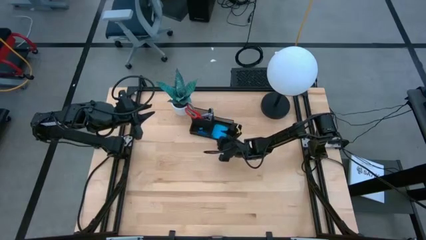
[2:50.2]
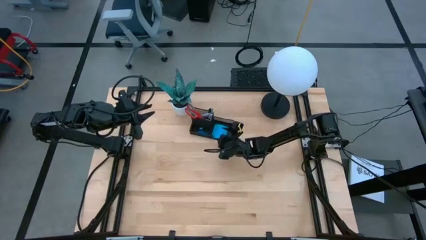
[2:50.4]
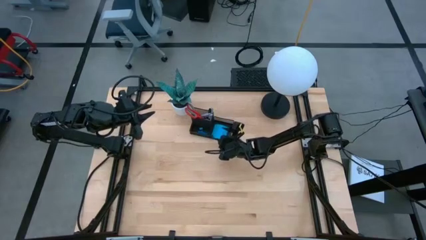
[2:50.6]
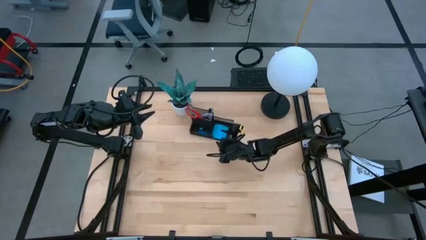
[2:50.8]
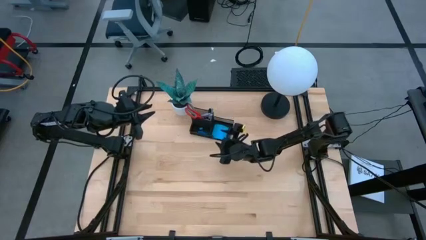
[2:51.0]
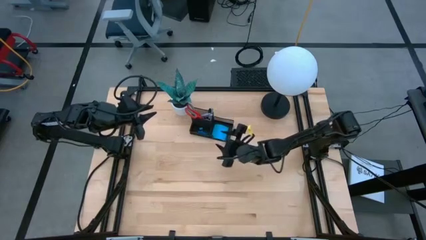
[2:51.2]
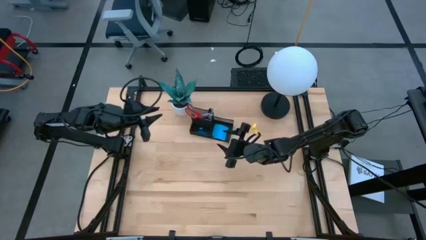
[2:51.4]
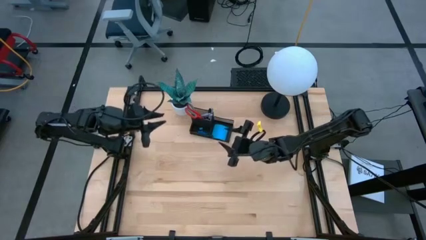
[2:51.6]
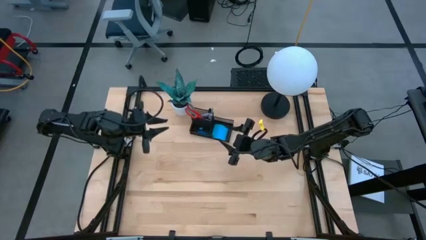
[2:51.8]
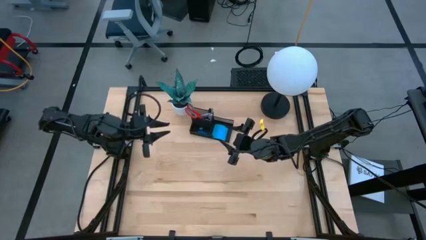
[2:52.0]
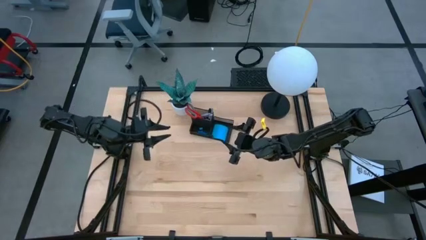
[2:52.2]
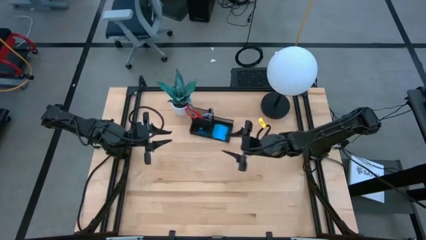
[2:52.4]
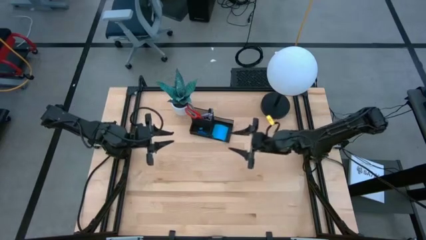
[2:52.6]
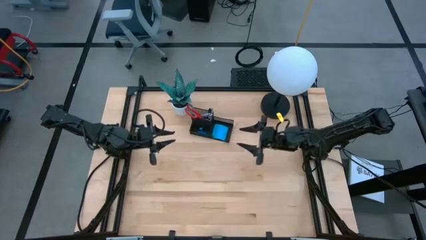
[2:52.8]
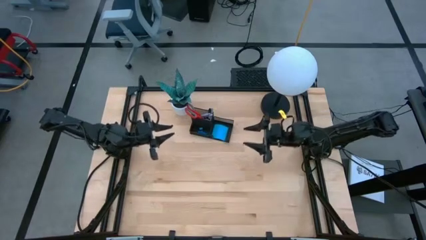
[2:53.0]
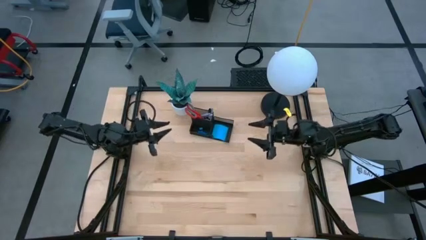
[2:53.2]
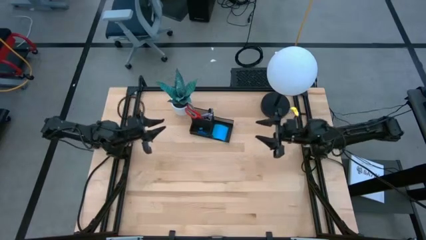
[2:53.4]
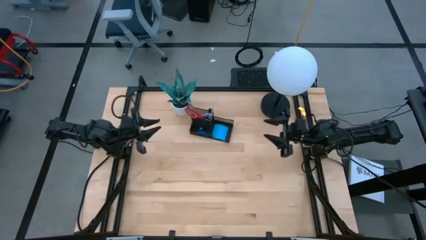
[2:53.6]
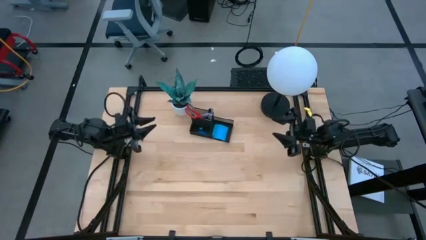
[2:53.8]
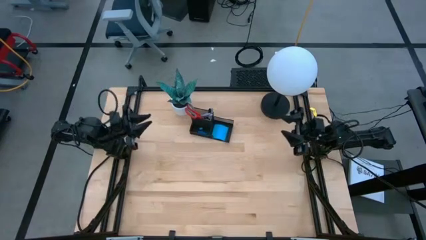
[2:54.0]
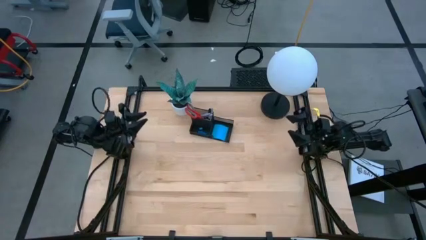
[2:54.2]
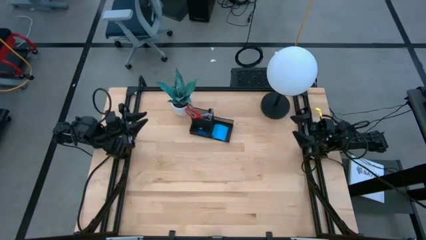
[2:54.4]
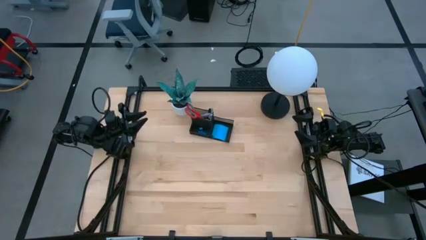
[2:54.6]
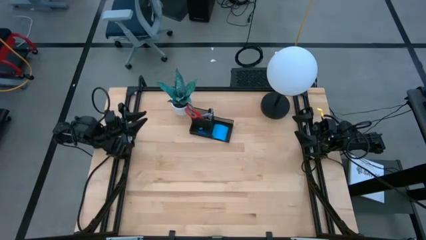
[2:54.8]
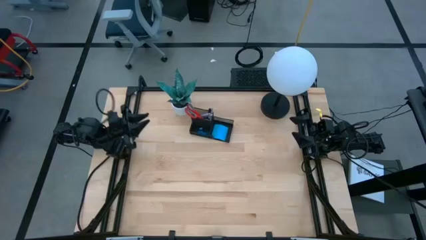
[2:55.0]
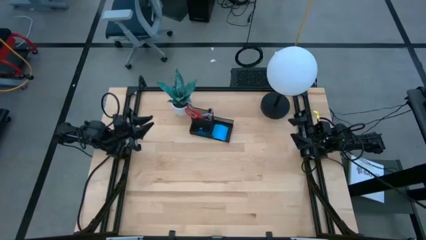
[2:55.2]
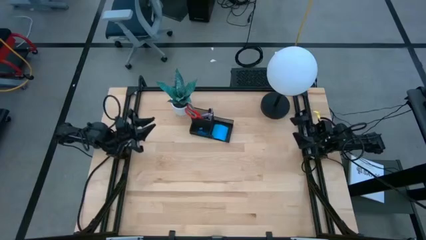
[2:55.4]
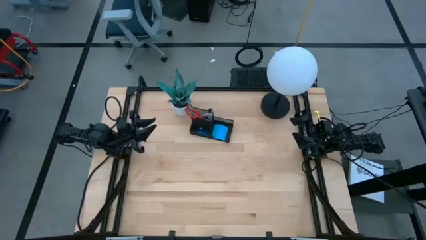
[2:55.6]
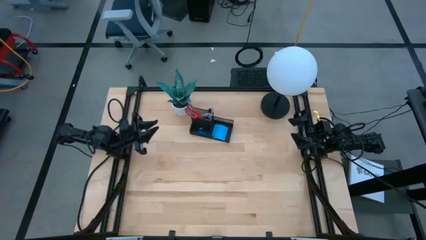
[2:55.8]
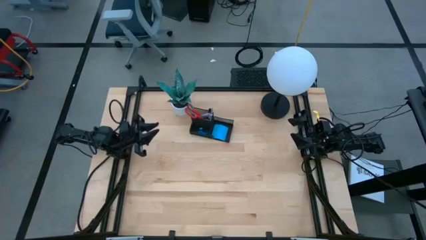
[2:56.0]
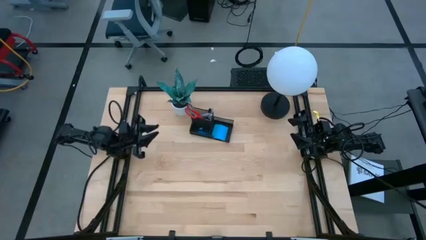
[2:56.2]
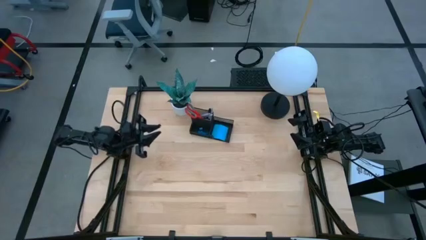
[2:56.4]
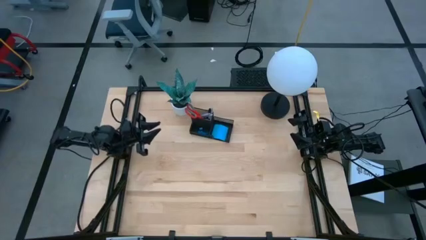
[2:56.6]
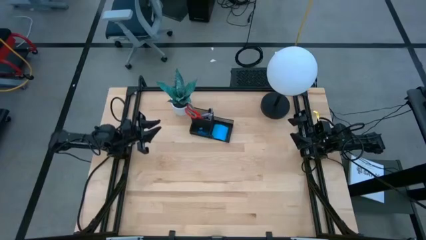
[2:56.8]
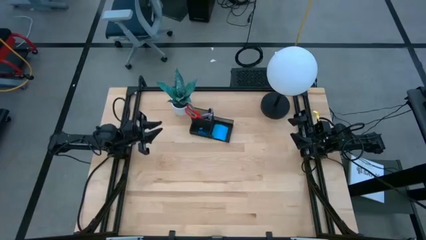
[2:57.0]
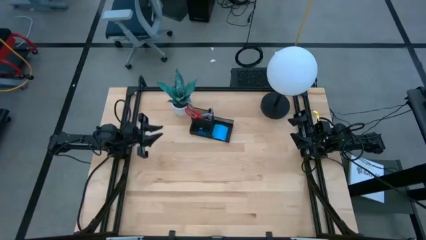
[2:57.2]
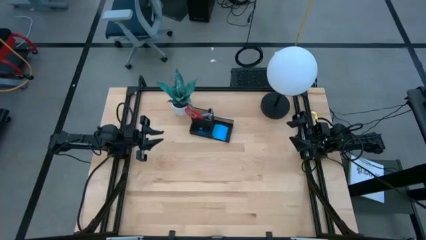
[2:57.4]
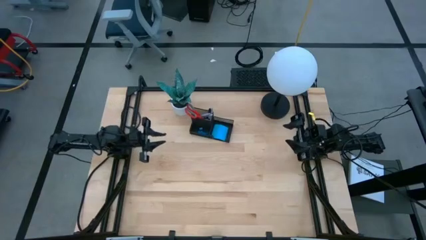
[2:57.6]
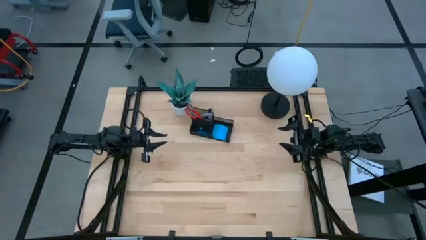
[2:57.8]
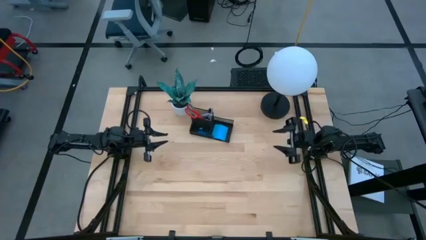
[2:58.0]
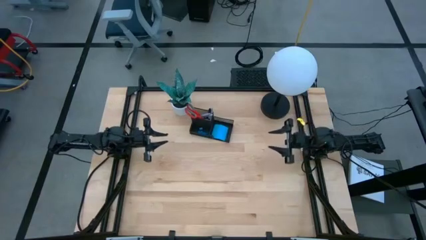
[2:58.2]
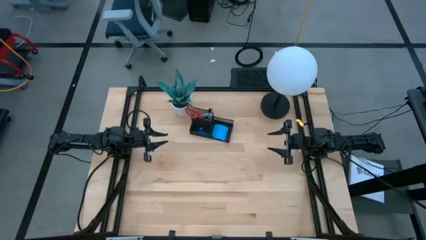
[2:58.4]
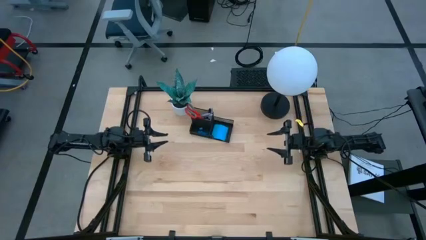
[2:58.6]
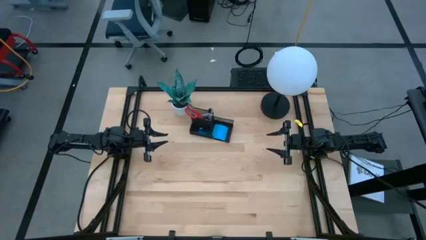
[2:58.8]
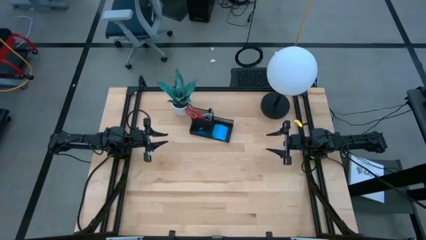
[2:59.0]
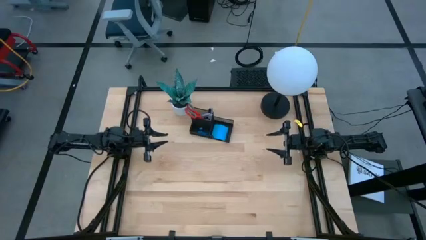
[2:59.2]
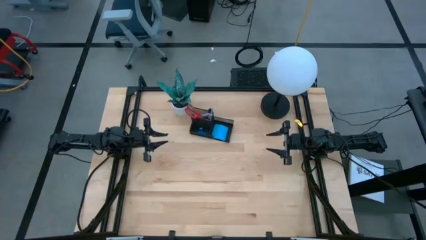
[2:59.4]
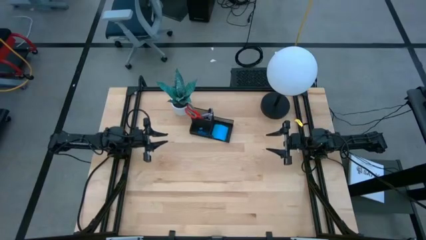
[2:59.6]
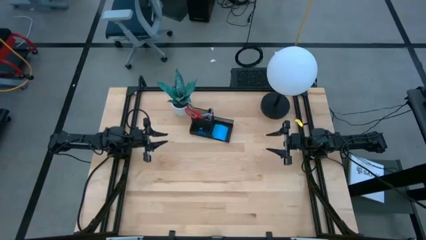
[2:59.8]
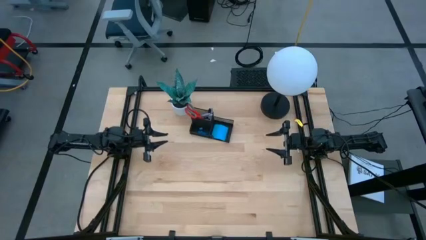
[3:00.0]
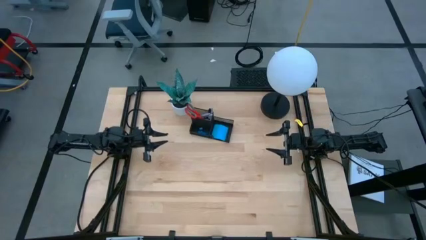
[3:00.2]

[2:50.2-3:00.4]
Task: Pick and place office supplies into organizer
Return to Home Position

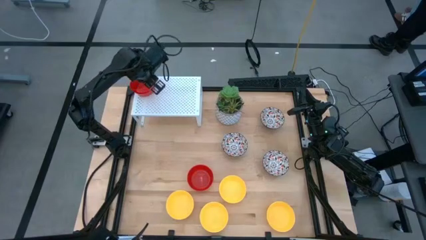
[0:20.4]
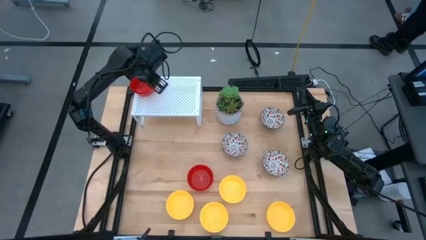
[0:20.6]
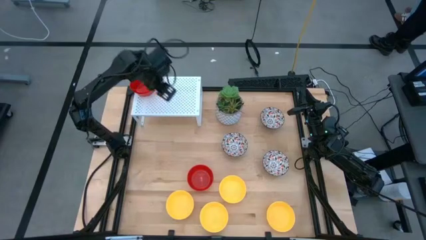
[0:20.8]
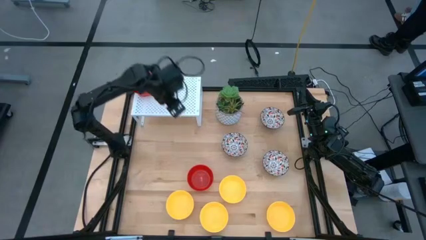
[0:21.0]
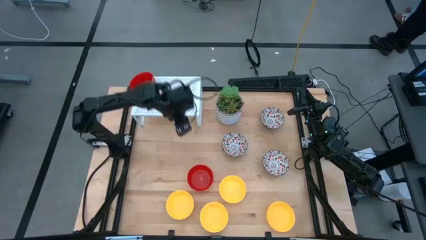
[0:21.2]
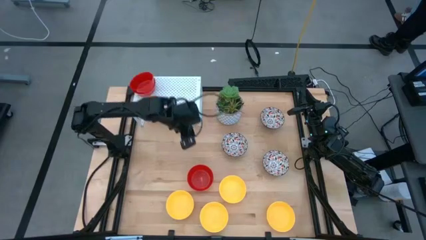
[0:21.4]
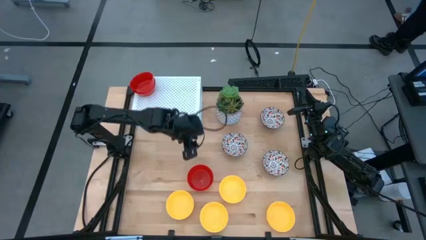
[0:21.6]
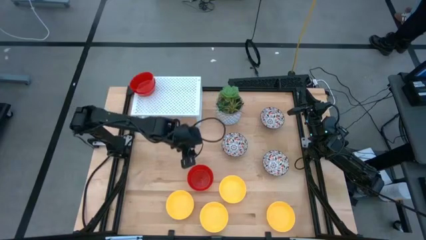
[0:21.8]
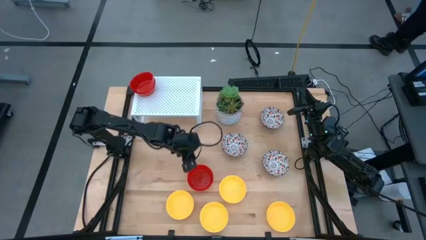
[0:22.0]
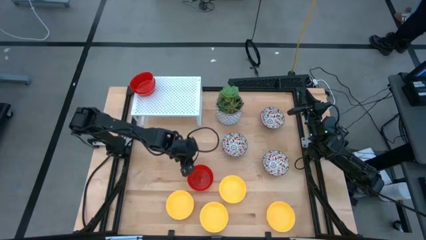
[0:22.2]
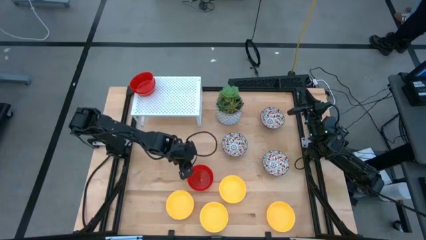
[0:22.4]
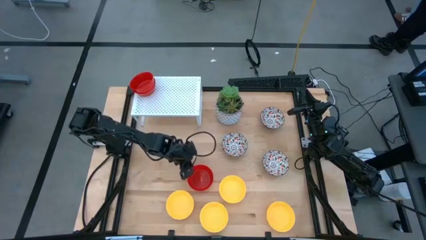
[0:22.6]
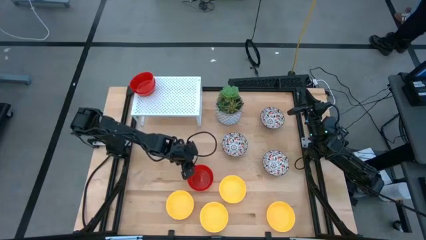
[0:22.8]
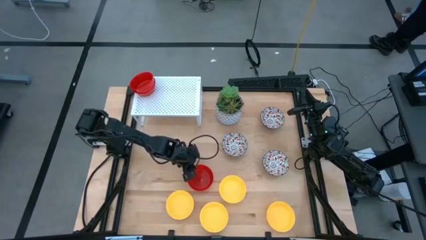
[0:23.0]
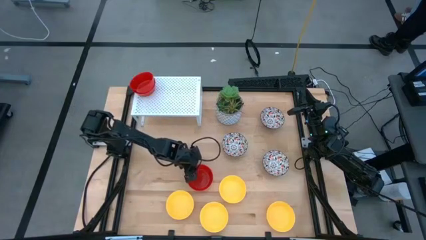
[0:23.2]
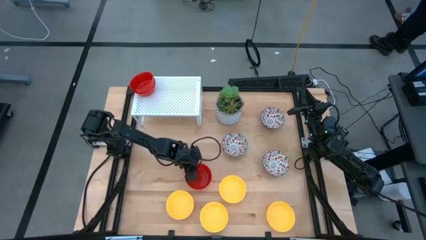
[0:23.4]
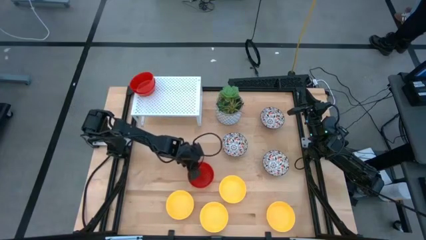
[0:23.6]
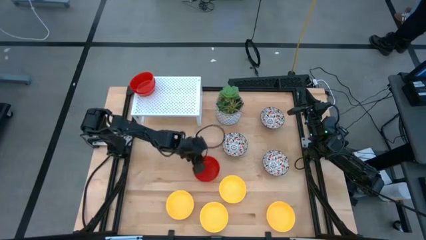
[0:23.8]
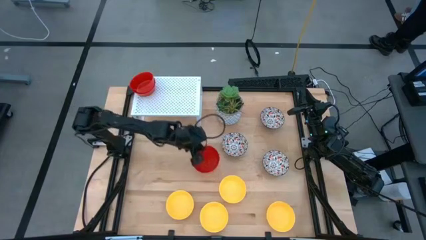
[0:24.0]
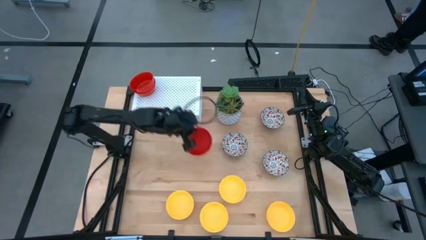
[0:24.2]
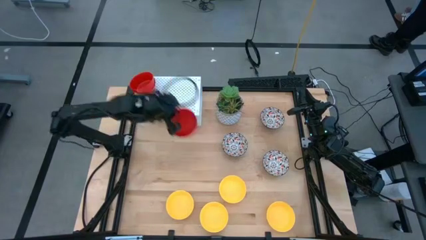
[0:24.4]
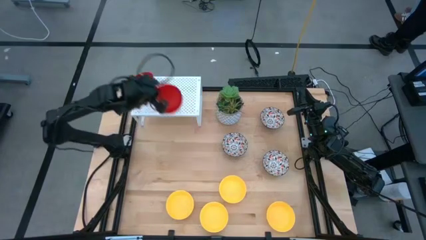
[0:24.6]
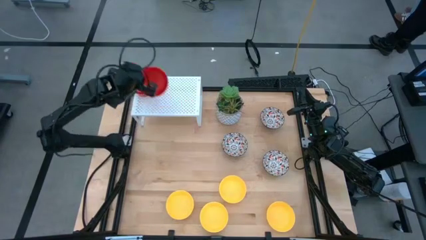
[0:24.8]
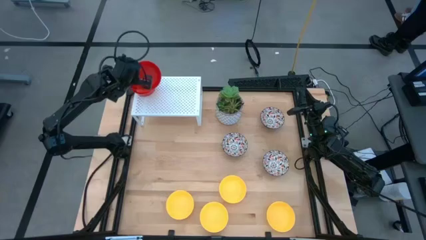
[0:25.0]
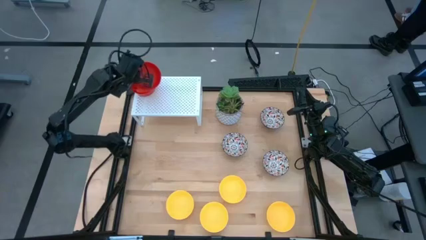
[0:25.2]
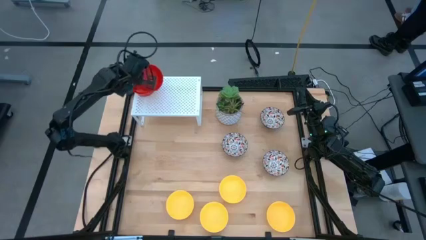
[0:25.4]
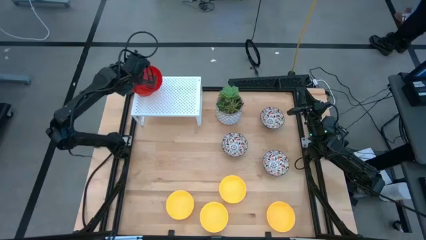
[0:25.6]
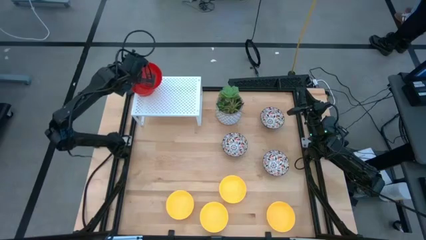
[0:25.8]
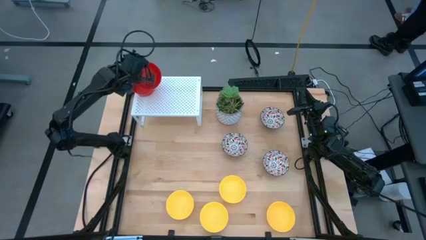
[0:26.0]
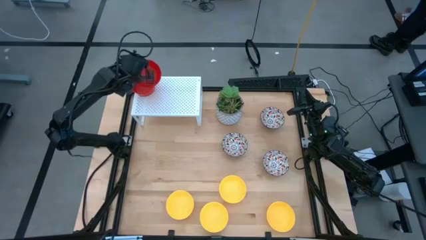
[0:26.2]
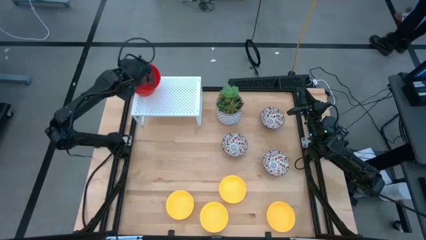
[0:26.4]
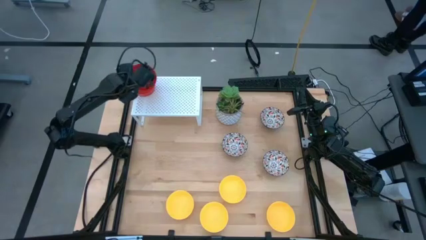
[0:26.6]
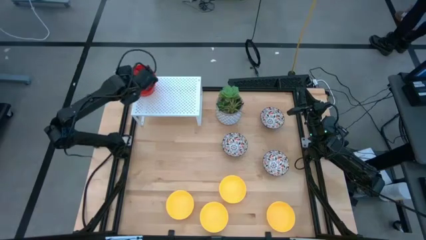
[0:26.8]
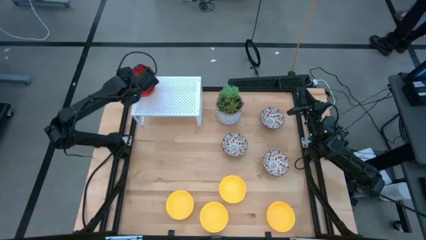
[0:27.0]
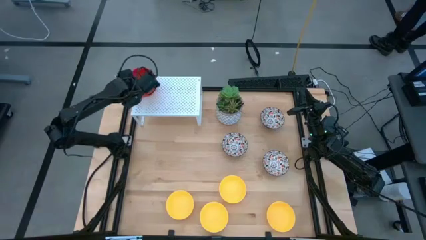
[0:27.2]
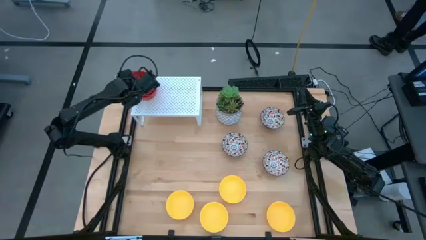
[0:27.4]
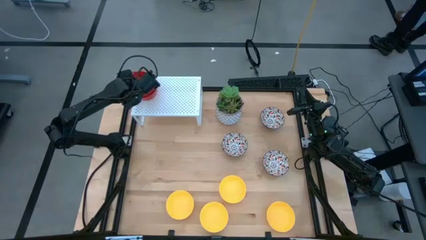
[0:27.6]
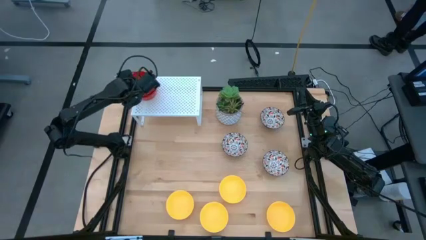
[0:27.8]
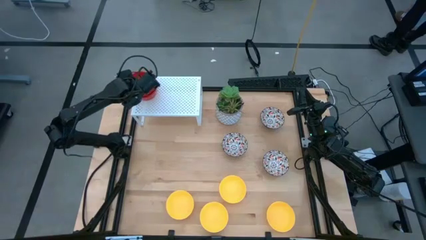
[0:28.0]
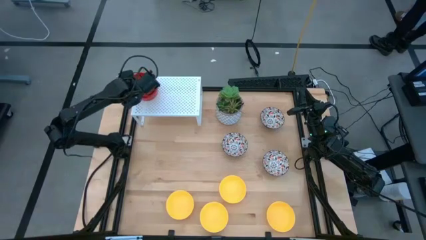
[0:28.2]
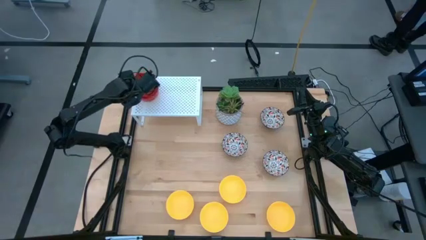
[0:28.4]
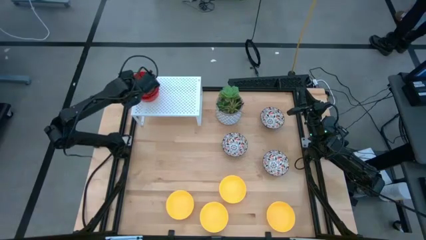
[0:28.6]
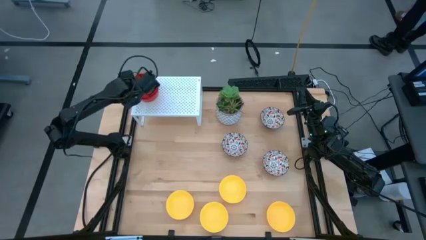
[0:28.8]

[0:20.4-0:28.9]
Task: Pick & Place Mini bowls
Stack the red bowl on the red bowls on the shelf
